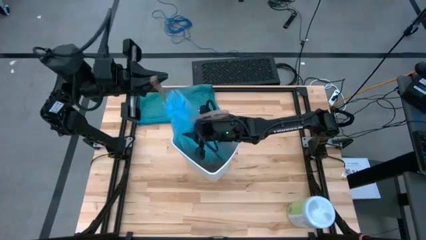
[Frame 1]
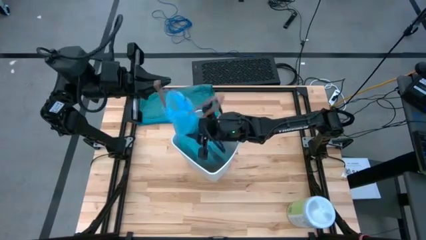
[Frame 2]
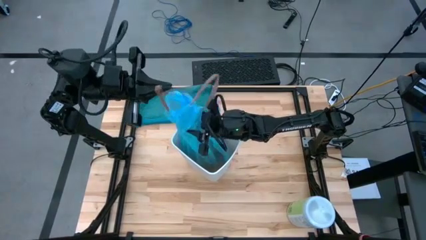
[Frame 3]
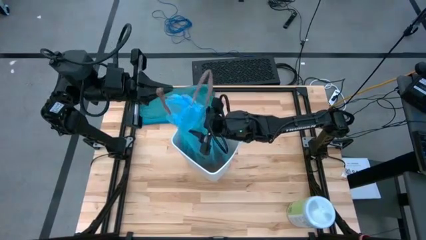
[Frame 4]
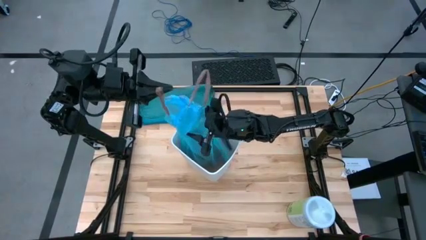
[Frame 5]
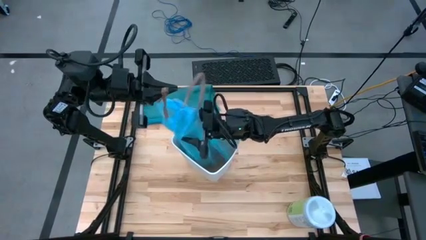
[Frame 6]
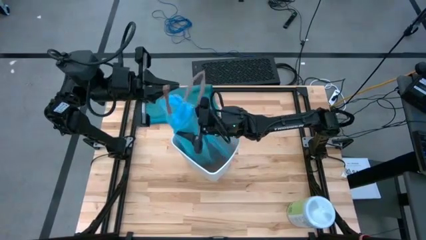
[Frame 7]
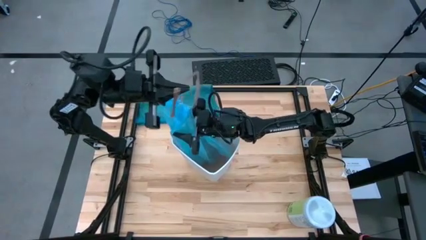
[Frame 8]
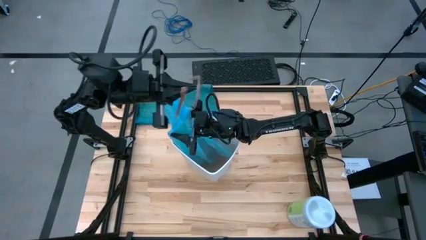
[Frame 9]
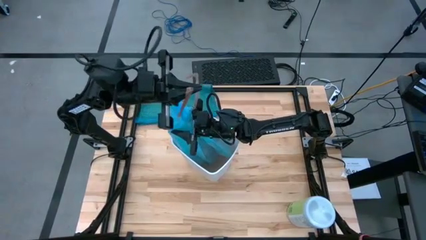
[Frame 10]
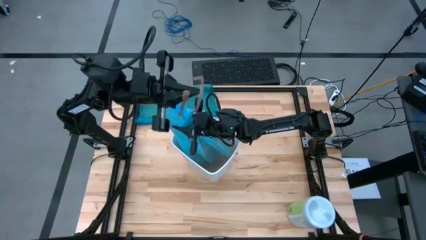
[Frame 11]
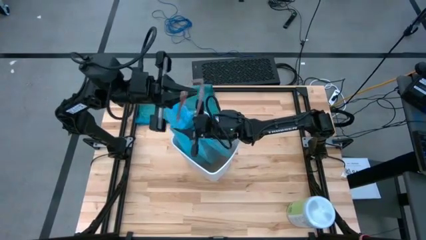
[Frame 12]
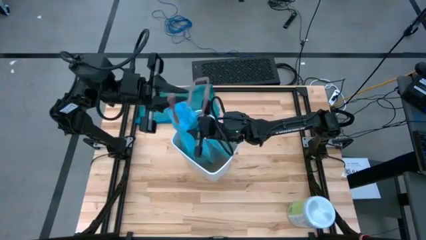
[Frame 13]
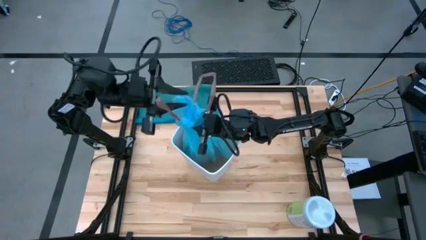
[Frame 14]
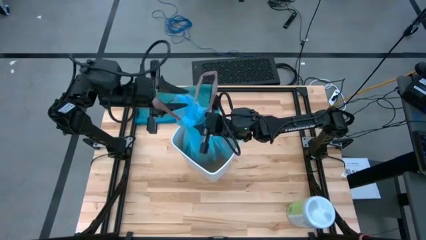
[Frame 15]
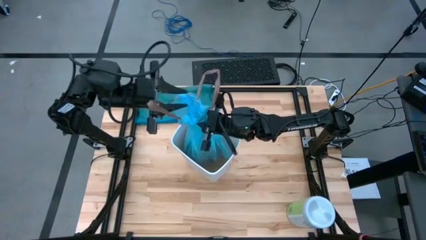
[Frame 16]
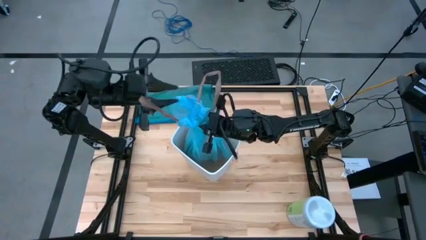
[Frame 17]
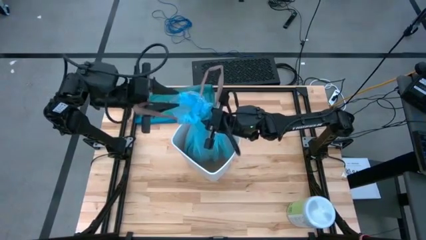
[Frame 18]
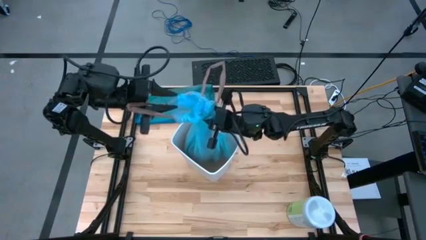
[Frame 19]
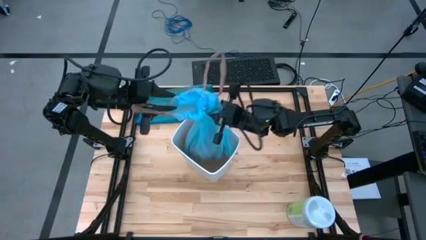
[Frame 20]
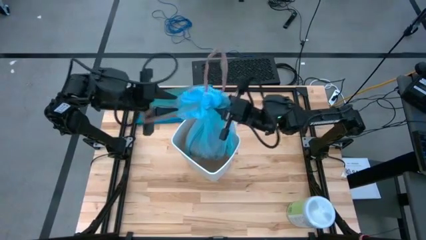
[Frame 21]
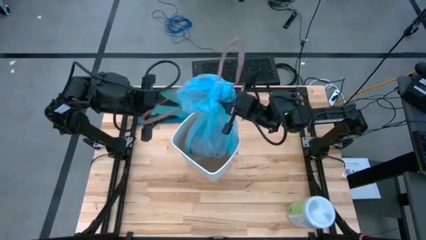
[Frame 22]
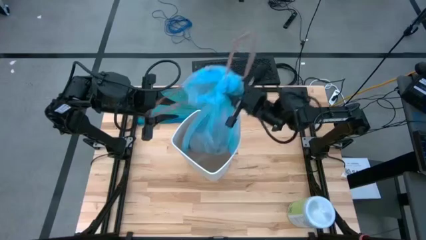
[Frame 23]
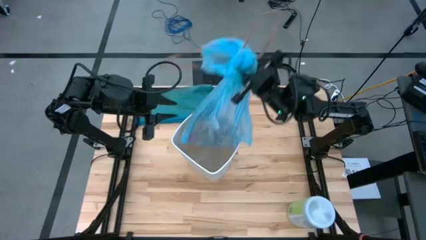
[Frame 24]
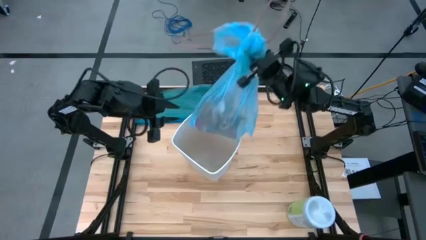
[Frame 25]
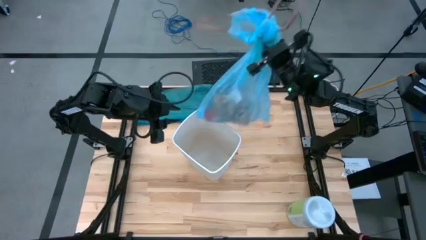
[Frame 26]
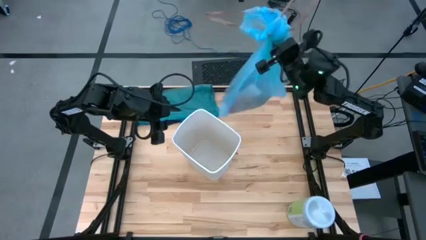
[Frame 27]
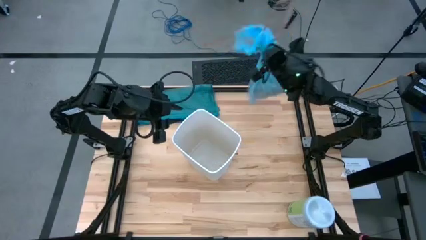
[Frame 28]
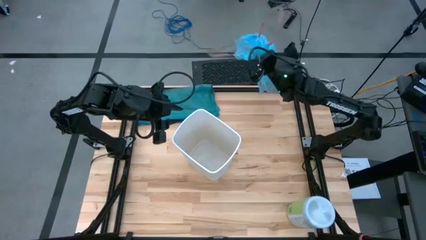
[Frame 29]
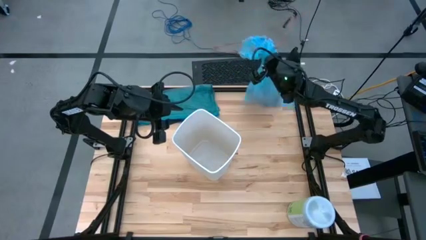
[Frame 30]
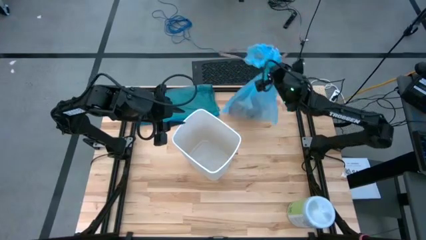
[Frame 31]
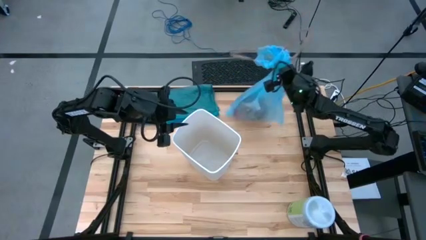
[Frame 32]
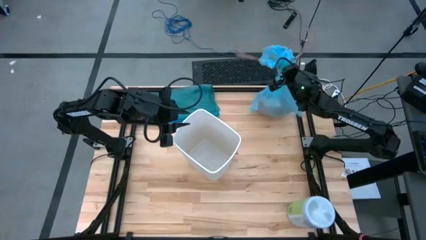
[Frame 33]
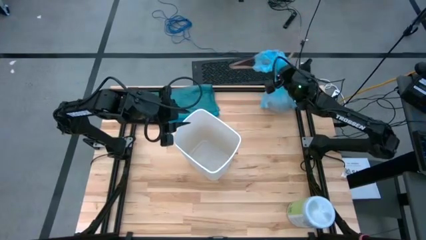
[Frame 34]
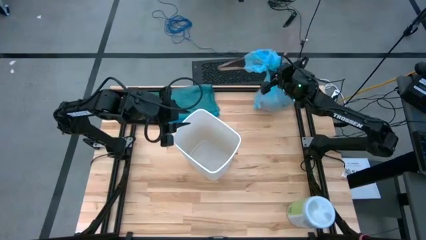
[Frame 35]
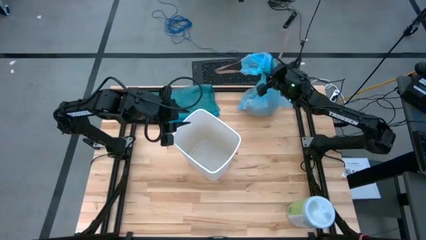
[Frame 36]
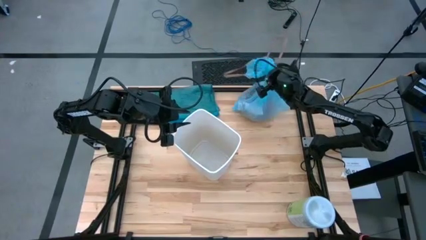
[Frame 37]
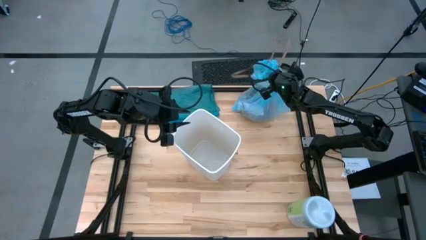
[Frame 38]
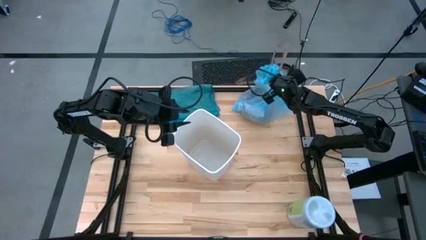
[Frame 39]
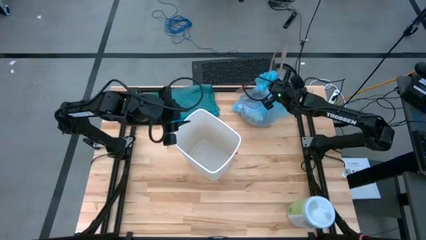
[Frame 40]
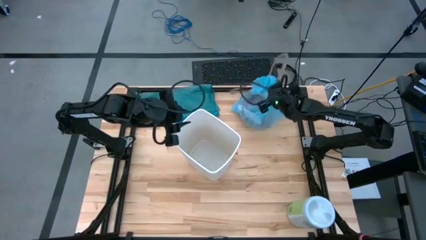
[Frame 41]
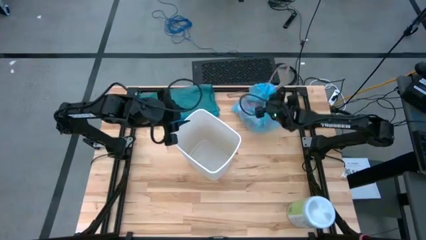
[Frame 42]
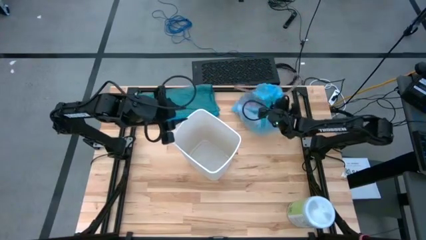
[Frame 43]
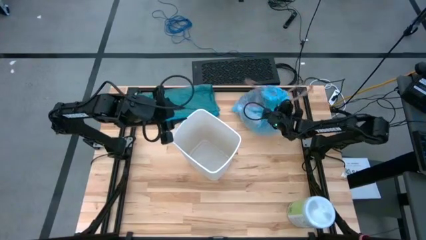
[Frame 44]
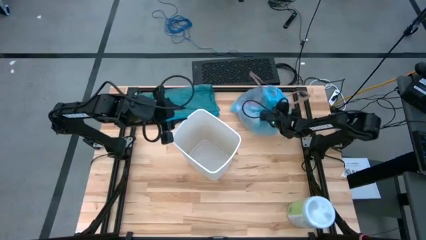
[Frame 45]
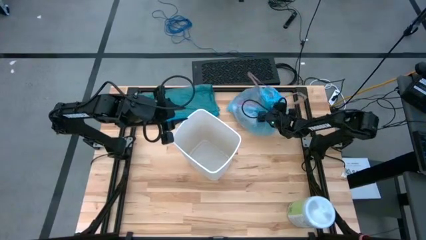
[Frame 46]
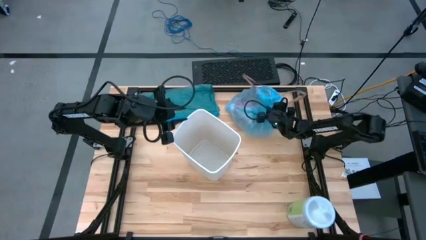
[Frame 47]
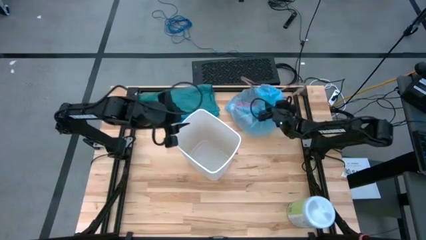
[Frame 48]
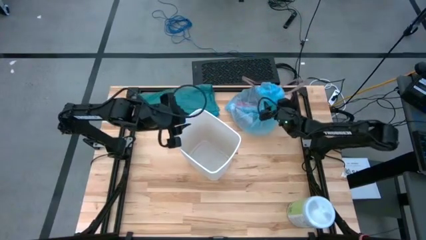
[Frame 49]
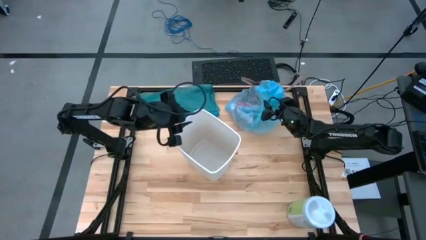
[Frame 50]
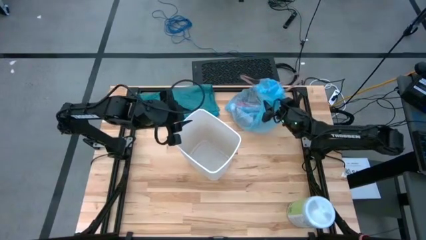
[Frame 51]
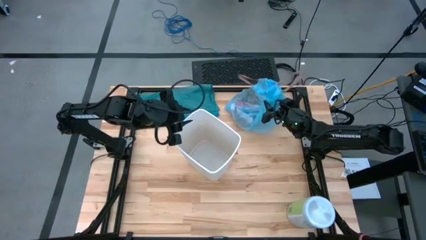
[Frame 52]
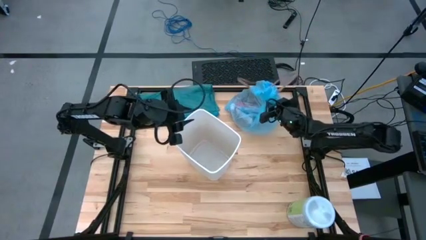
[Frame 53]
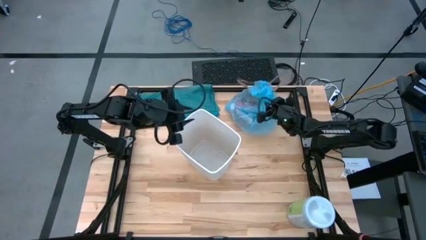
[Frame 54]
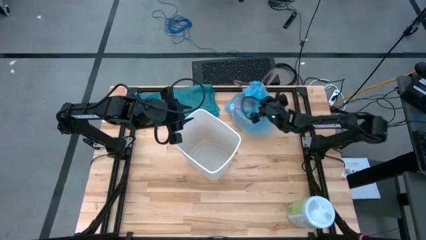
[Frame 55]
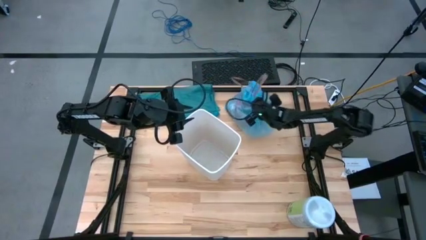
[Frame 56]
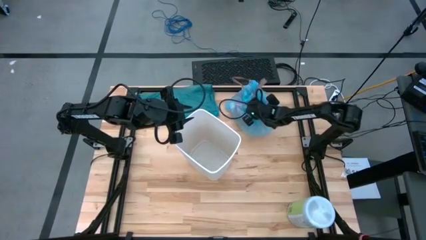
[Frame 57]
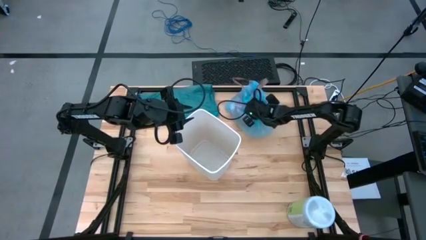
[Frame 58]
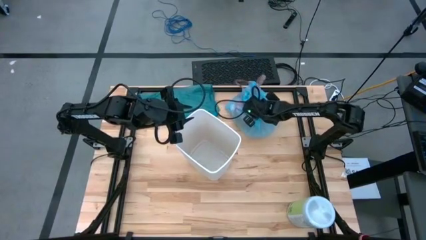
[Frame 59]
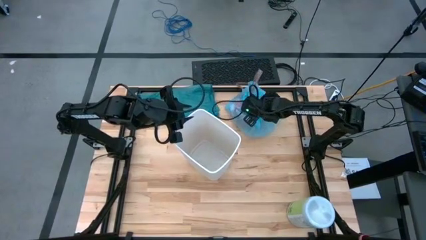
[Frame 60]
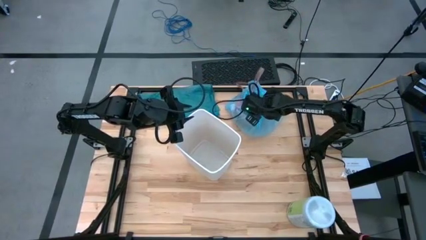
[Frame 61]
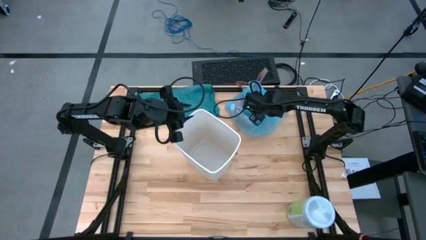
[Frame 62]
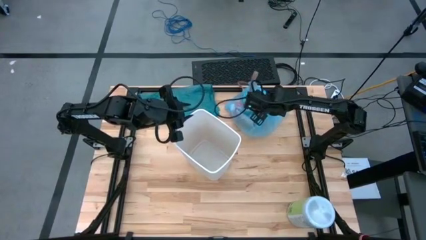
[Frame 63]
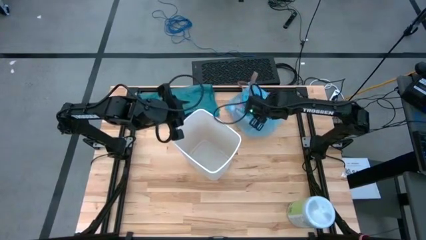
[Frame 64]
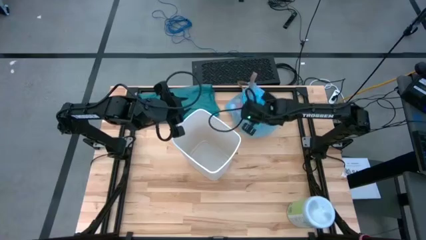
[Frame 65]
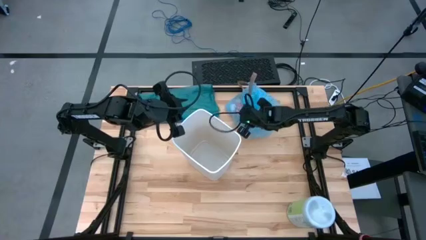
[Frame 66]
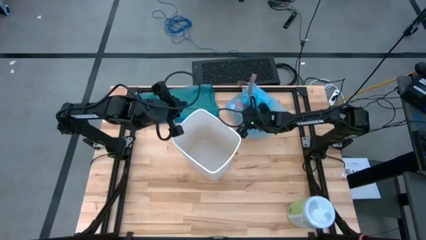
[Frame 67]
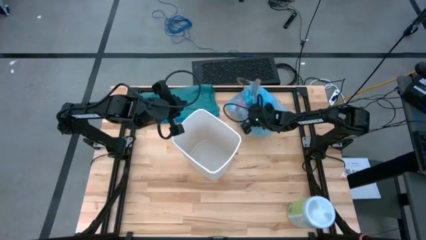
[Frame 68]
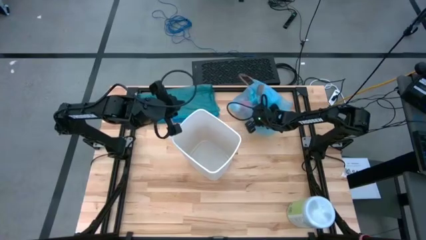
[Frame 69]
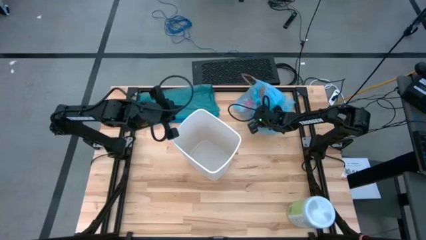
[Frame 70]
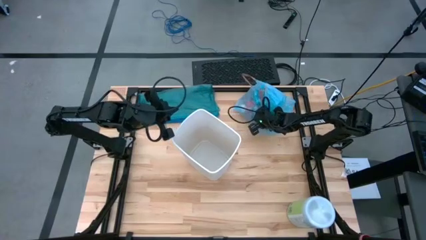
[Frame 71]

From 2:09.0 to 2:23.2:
Task: place trash/remove bag and relplace
Remove the blue trash bag from the bin

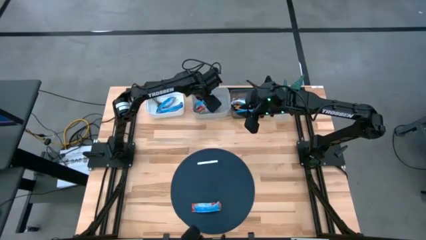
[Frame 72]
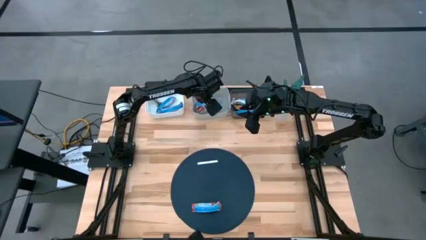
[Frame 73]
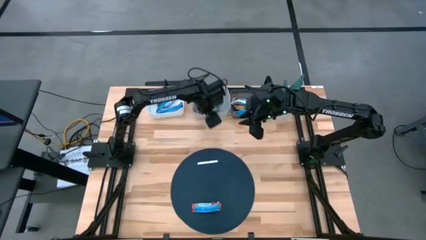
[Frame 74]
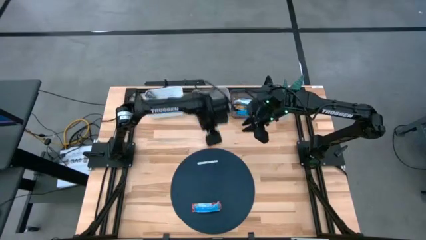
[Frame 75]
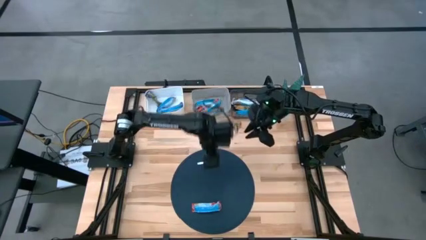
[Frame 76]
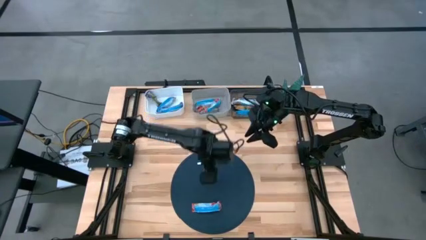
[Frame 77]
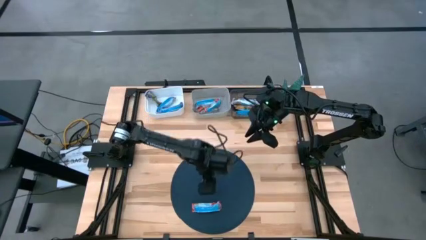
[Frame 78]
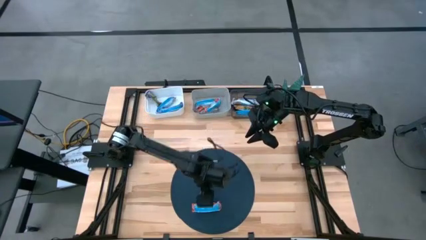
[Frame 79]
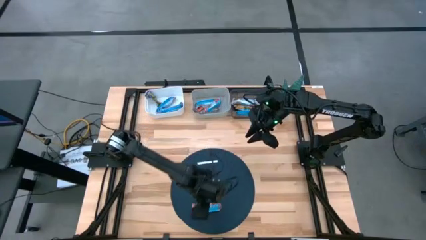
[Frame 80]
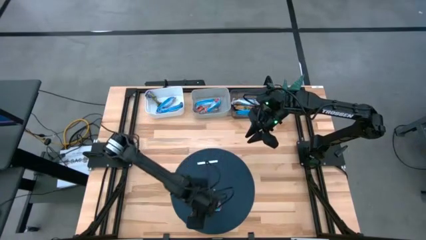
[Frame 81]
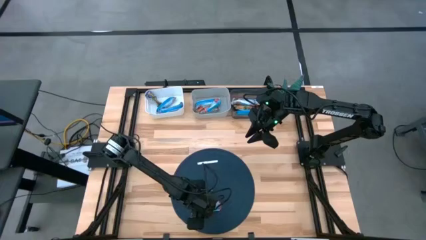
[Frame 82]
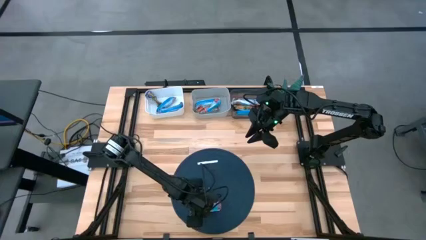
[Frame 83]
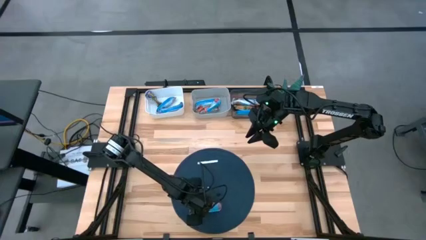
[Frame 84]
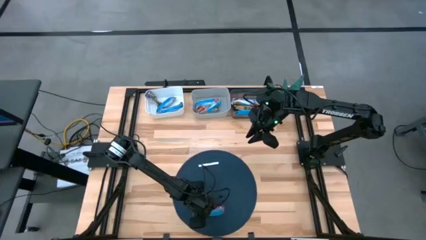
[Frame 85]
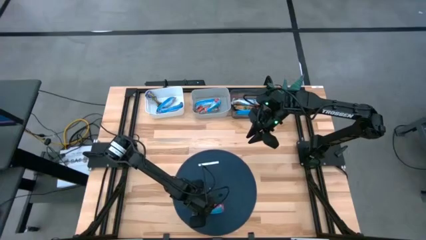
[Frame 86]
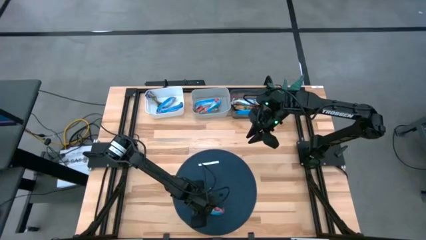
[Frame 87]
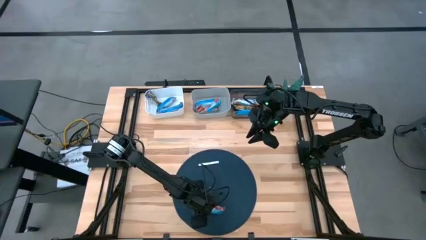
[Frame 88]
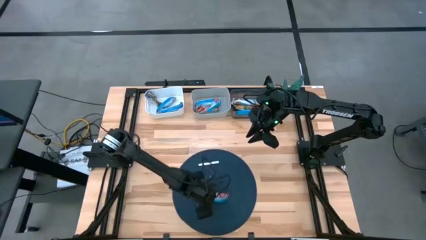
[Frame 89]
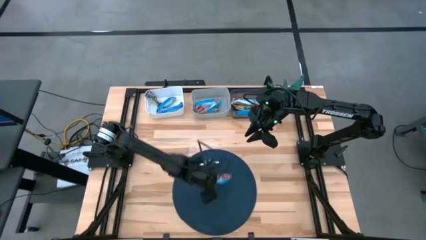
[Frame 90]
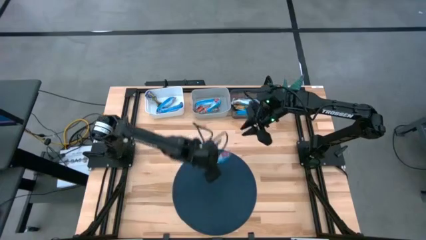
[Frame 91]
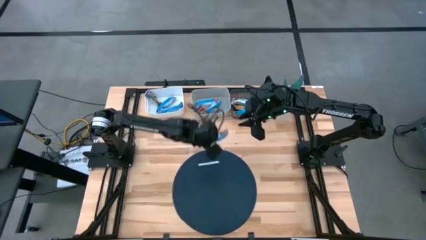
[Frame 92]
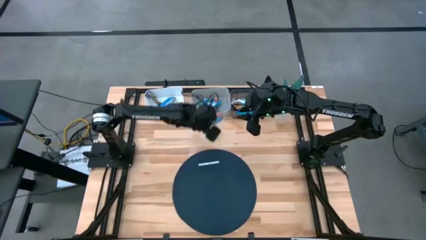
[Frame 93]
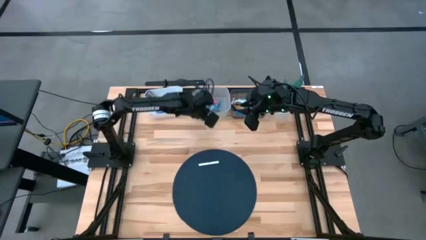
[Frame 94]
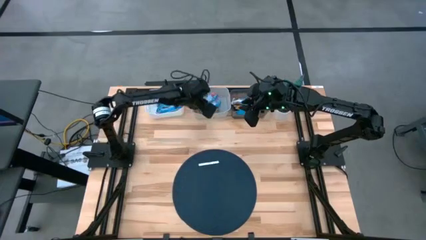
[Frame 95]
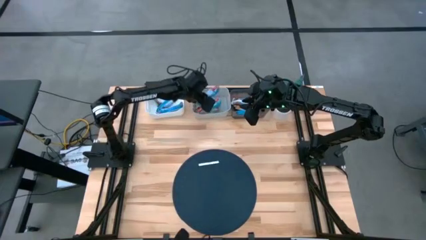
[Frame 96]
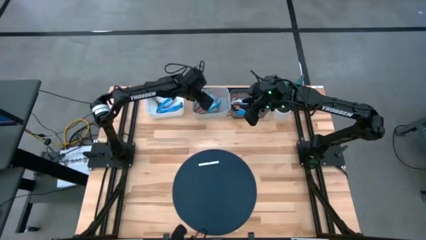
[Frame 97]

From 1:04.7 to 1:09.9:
Task: Pick and place Granola Bars by type
Put the red granola bar into the gray bin
